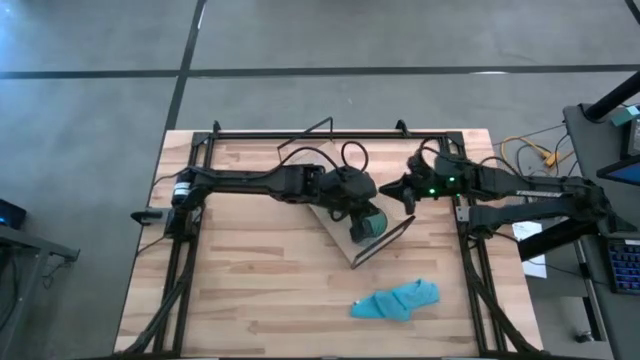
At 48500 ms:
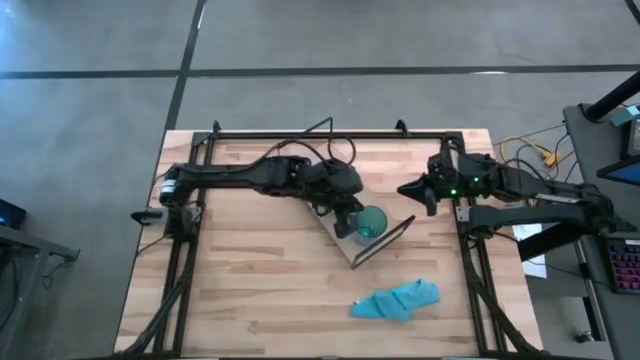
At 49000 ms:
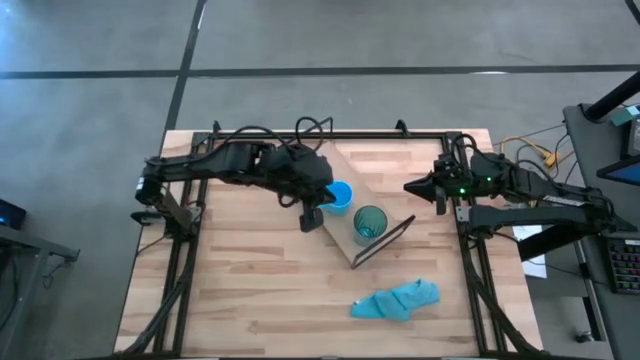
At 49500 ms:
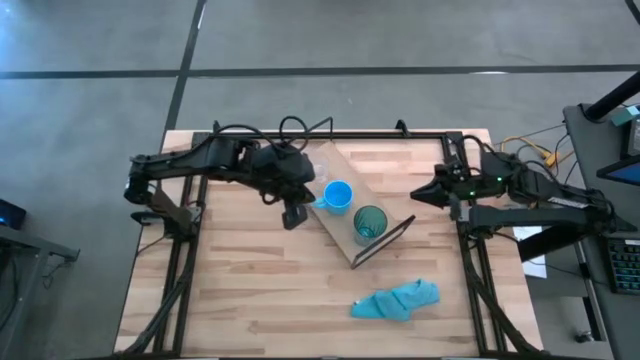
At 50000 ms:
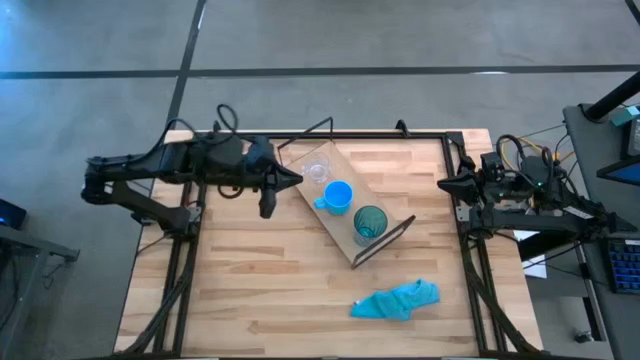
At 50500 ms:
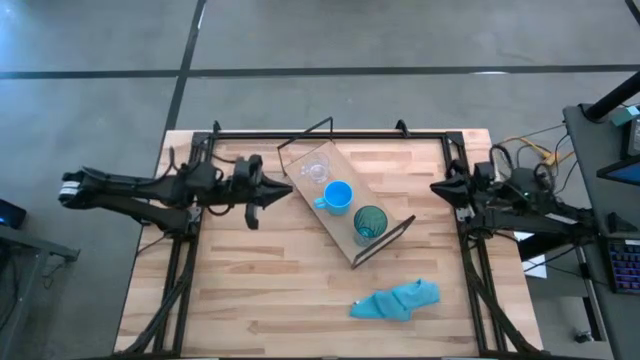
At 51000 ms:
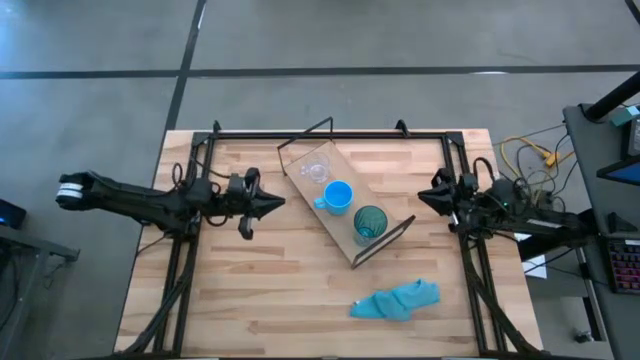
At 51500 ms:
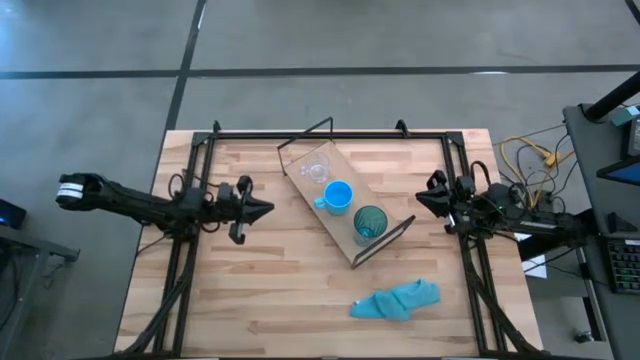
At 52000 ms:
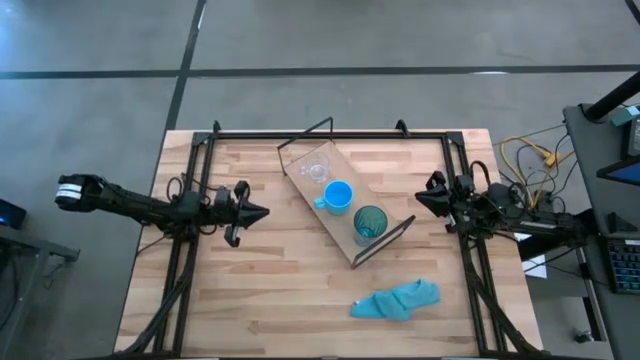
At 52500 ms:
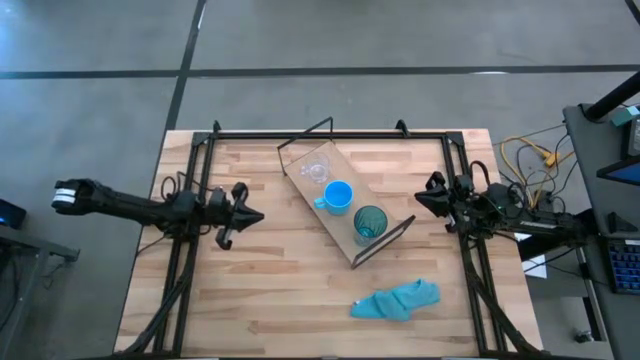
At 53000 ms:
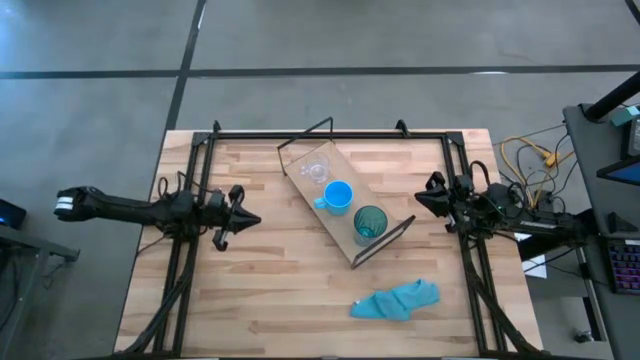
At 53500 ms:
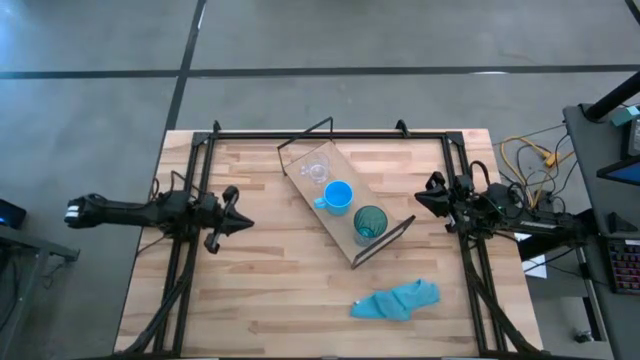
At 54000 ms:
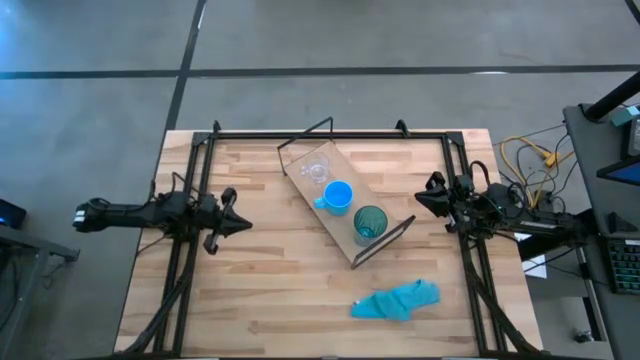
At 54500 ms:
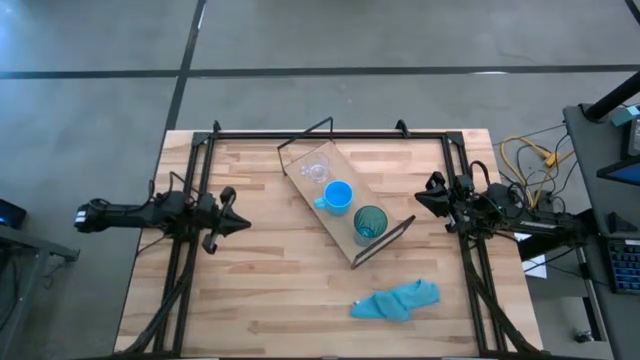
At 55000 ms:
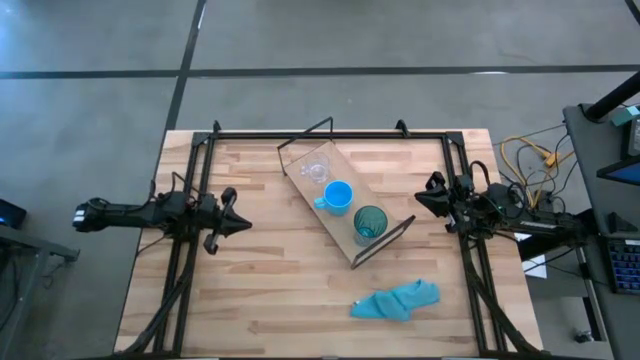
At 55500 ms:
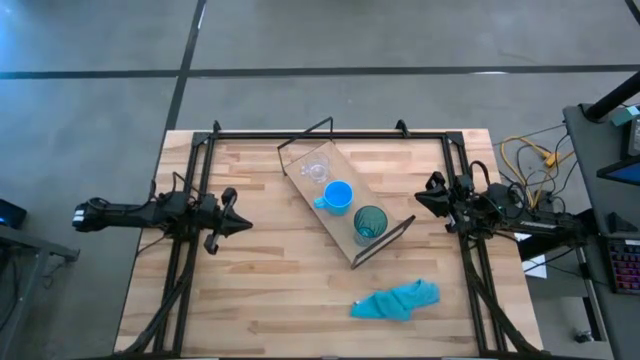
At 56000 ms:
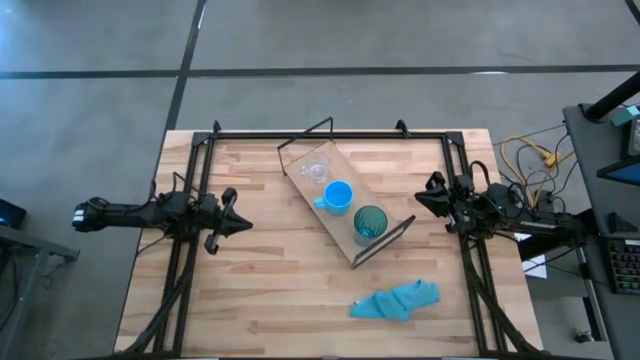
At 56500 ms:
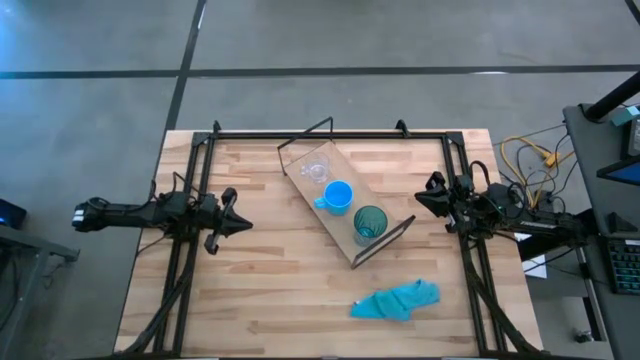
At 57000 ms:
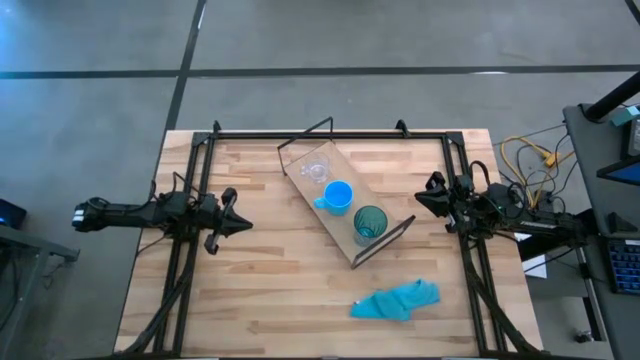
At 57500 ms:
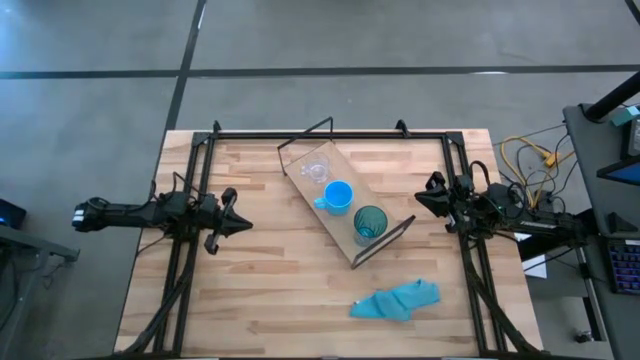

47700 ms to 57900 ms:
Task: Stack small to large cups/mugs on shelf
Return to Home position

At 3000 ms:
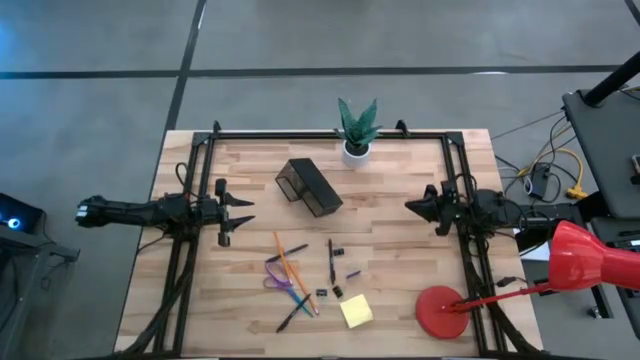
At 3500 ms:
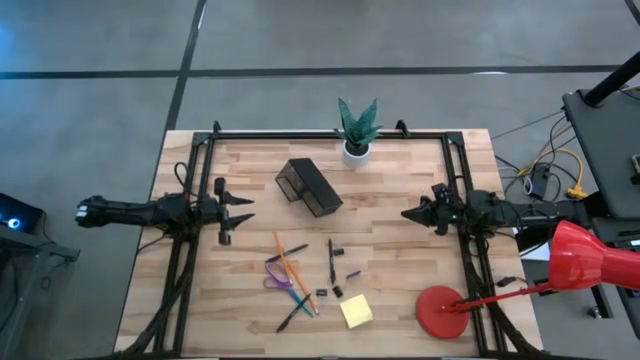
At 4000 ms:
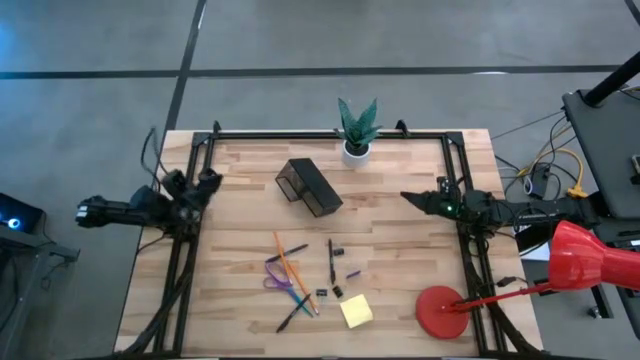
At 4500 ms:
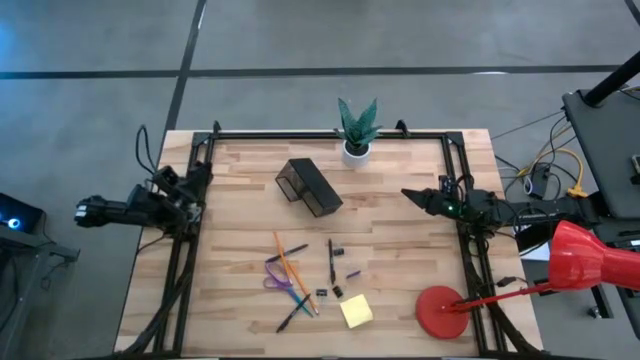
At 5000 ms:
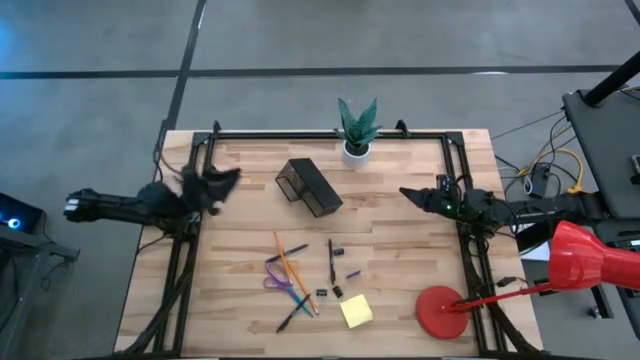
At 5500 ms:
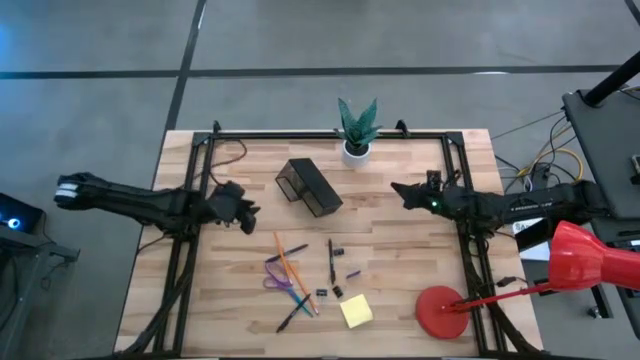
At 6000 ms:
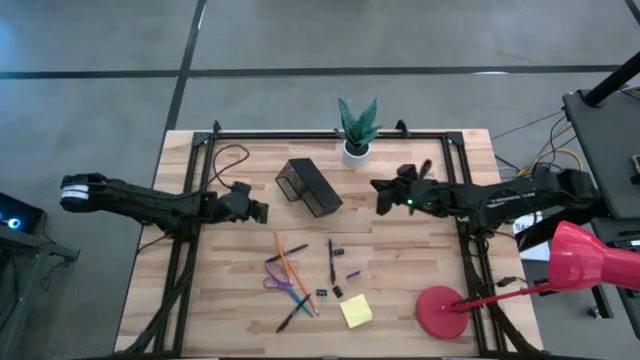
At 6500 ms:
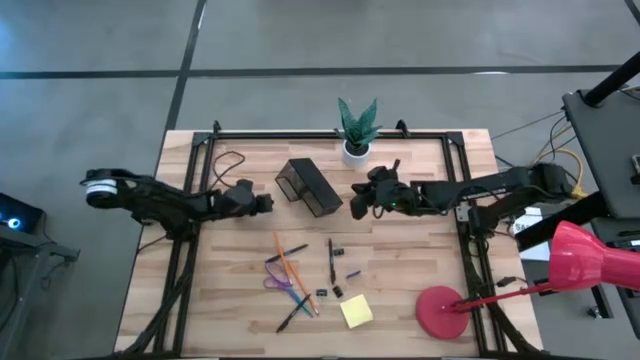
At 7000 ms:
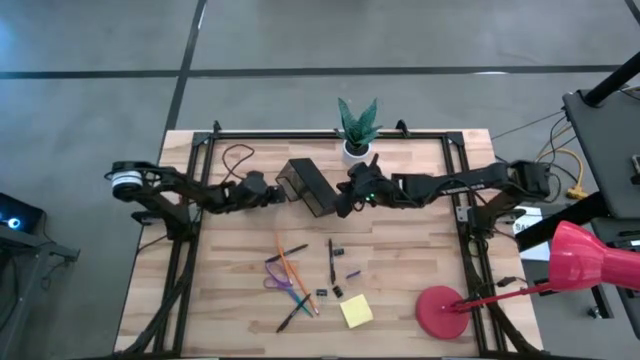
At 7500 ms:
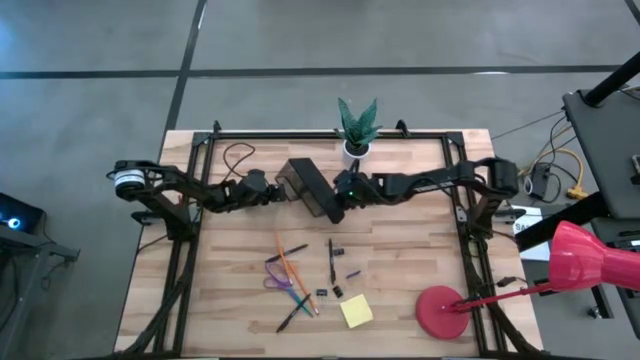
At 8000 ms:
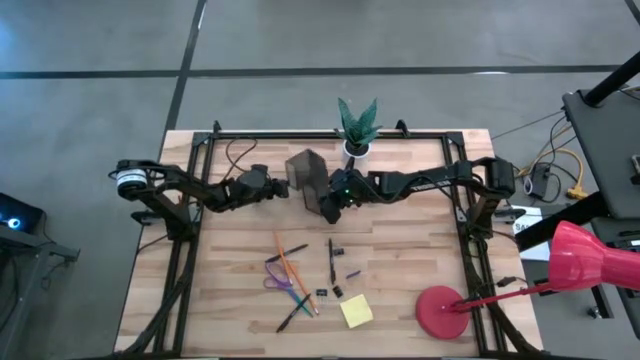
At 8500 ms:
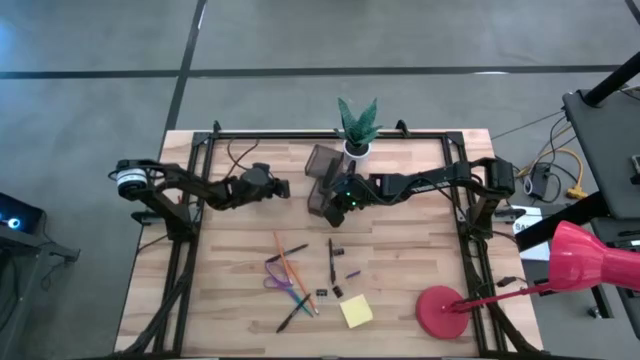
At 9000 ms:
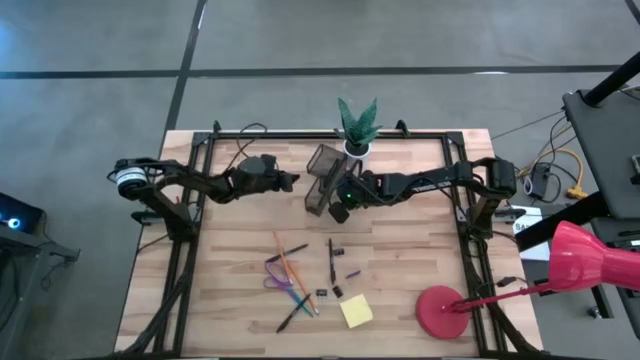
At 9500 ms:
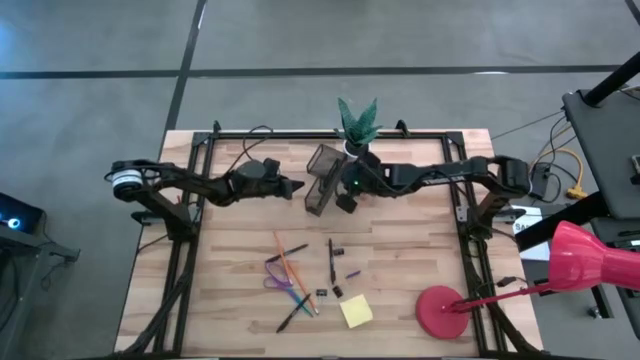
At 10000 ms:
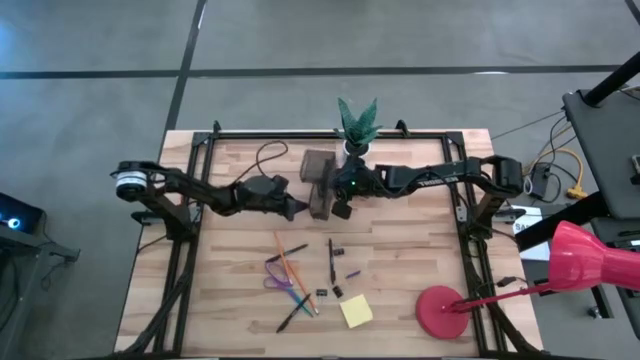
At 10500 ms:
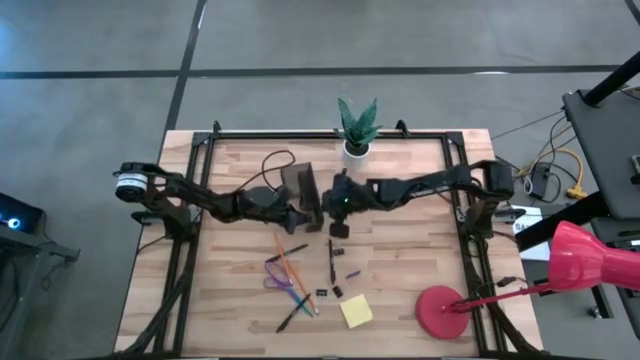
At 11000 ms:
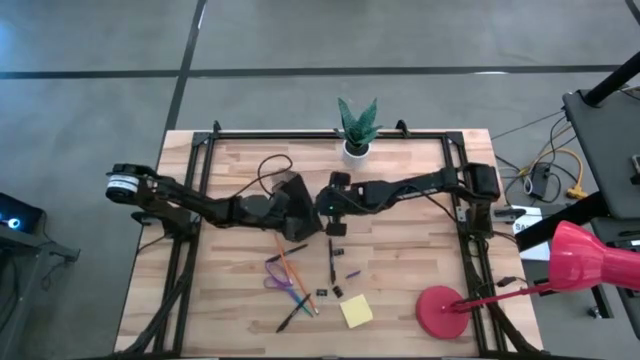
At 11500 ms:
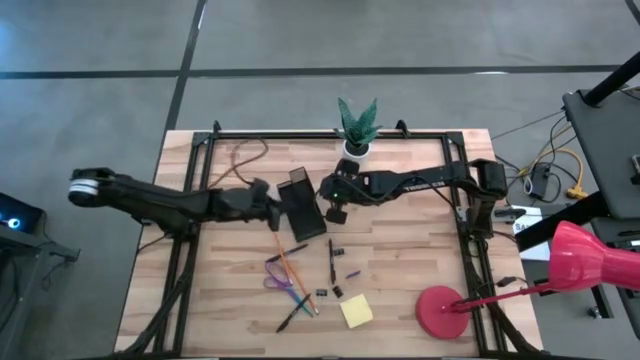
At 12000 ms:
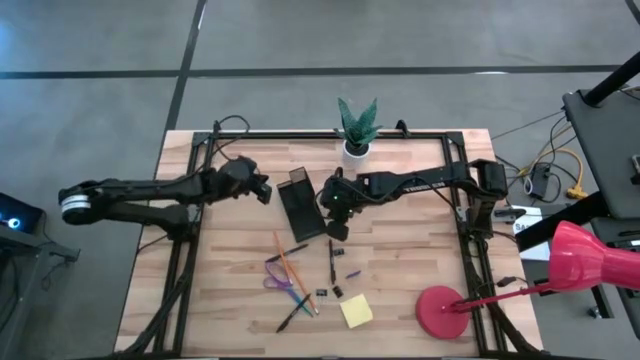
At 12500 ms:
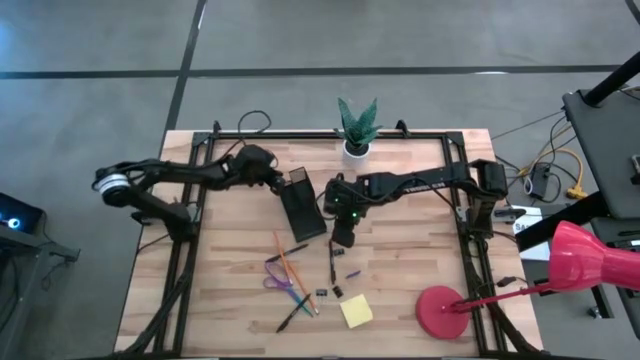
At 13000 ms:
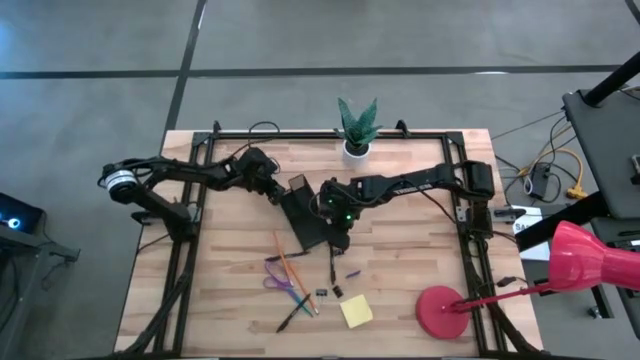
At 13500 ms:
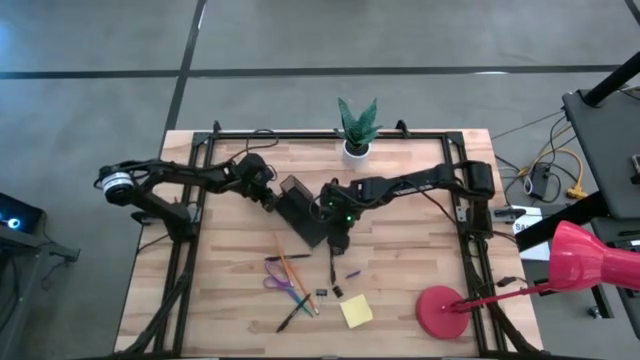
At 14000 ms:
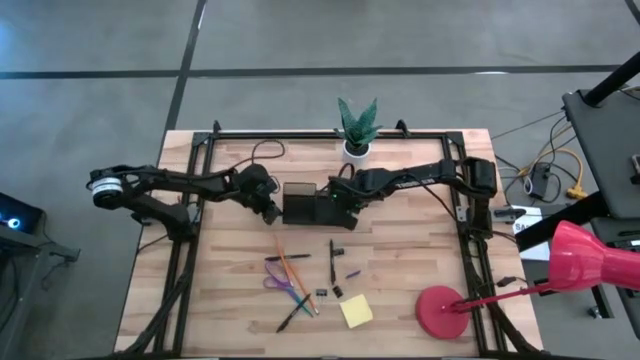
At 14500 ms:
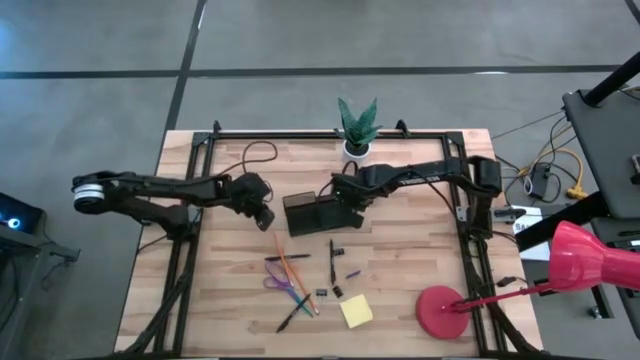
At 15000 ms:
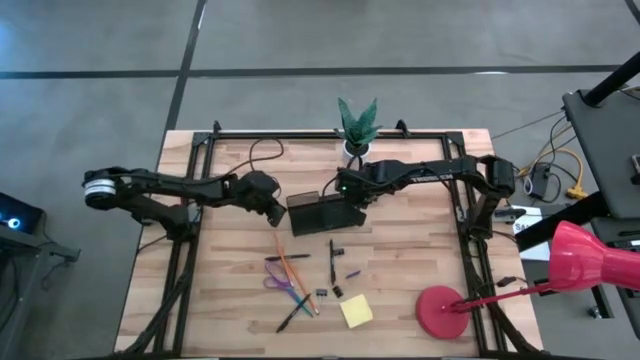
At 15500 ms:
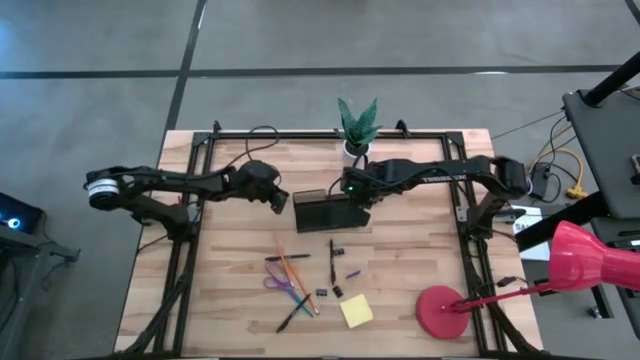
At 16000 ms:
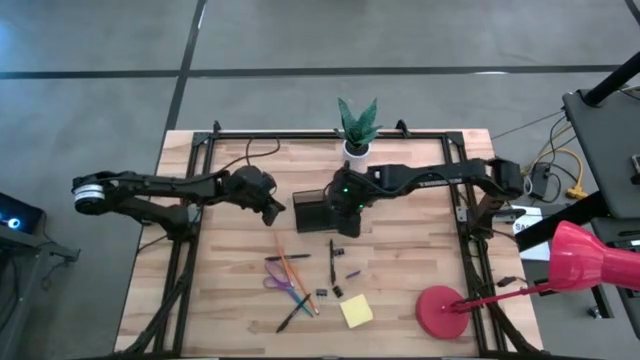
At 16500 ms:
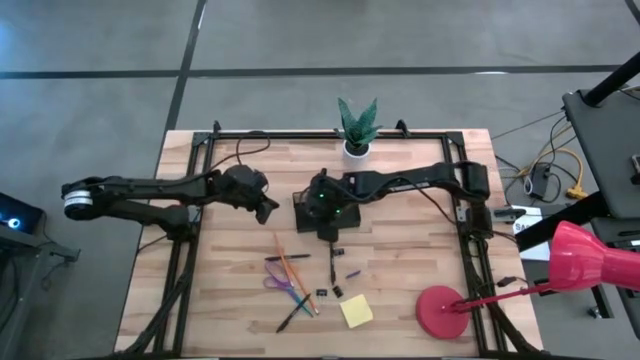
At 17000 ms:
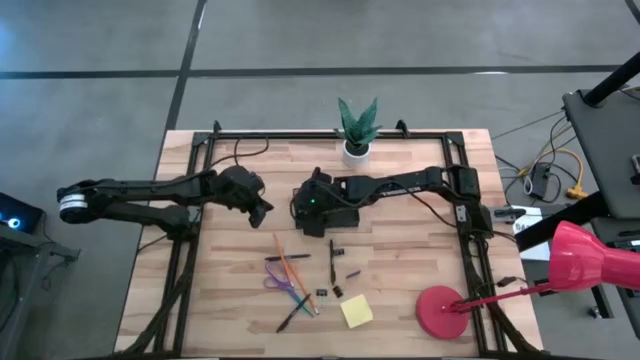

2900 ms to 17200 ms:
Task: Pick and place office supplies into organizer
Prepare the desk organizer to put the office items
